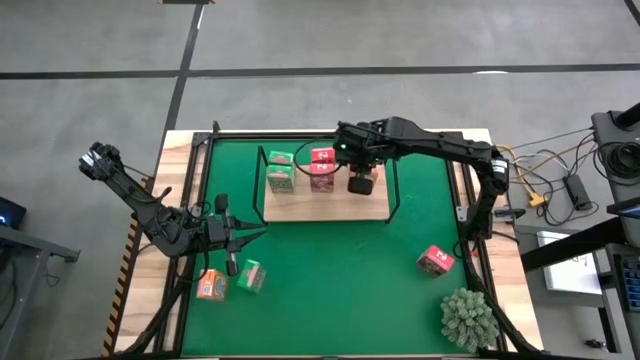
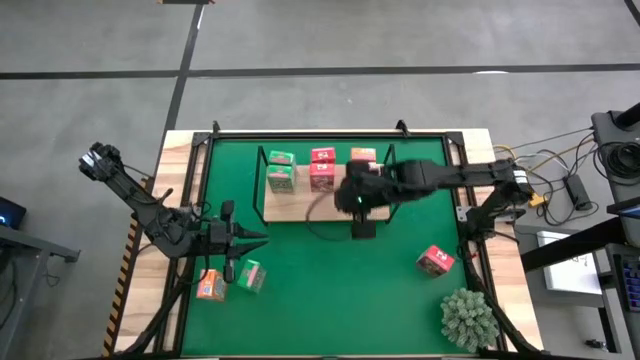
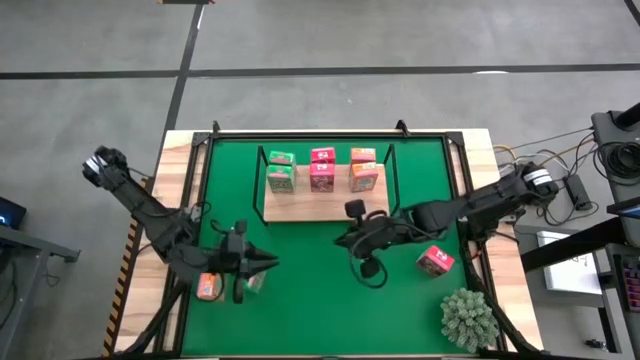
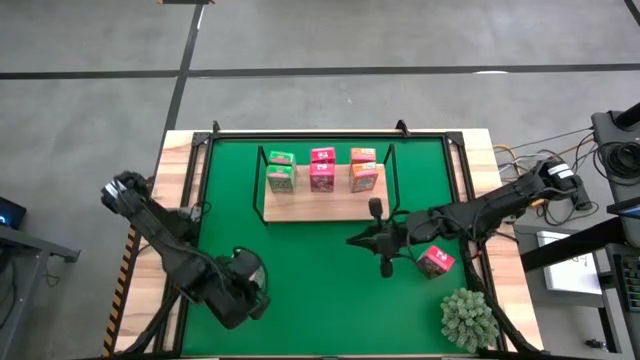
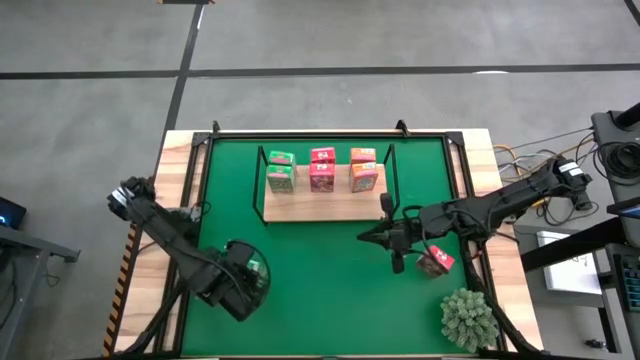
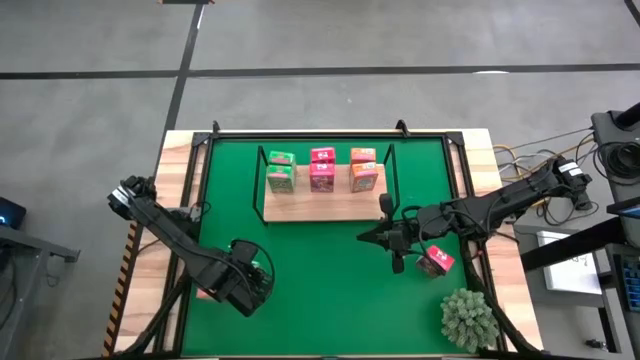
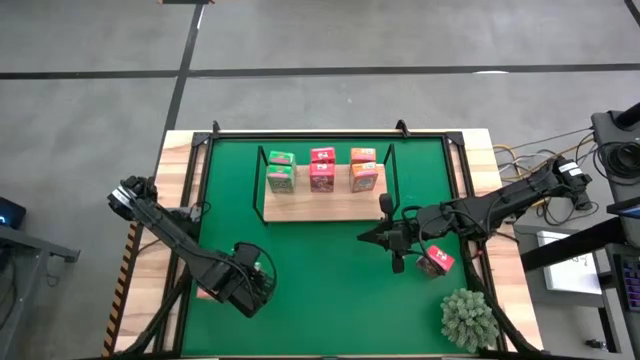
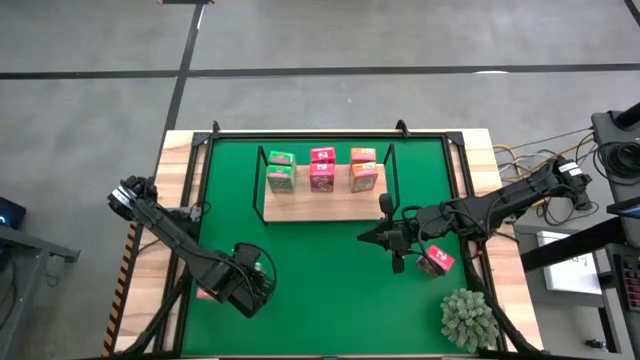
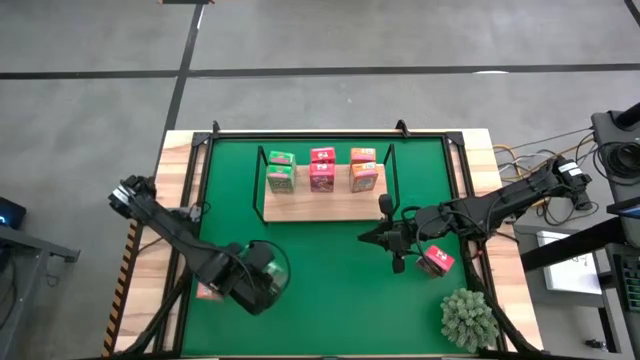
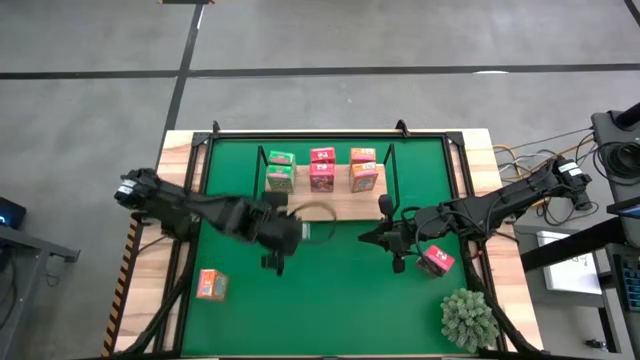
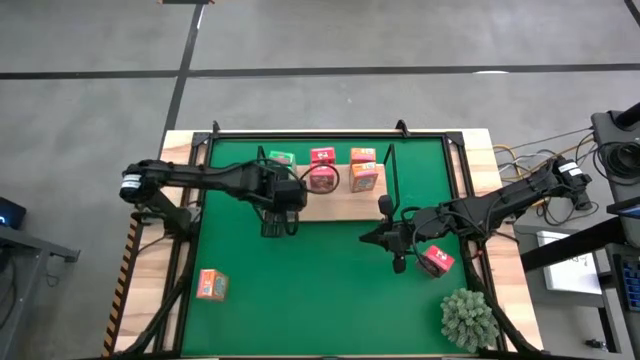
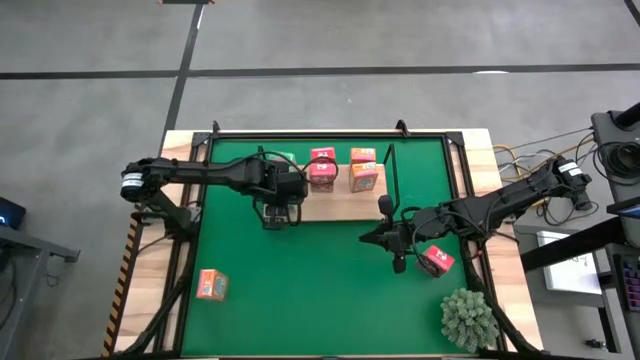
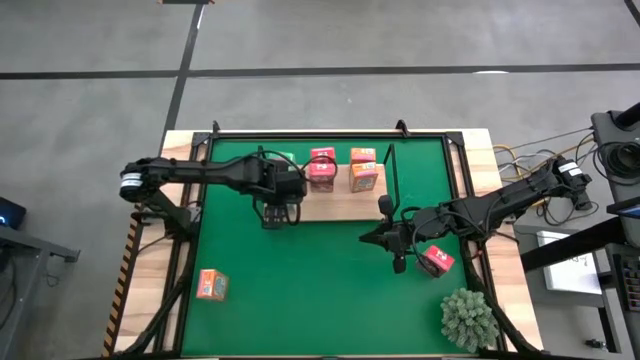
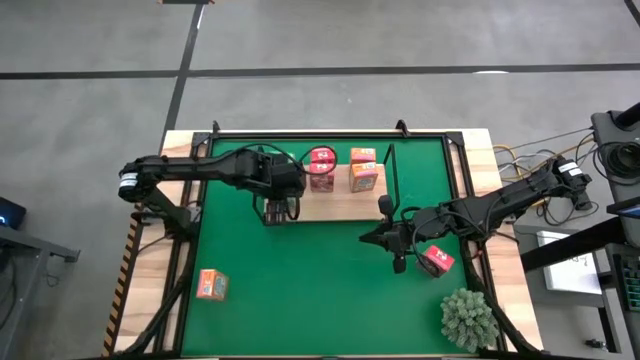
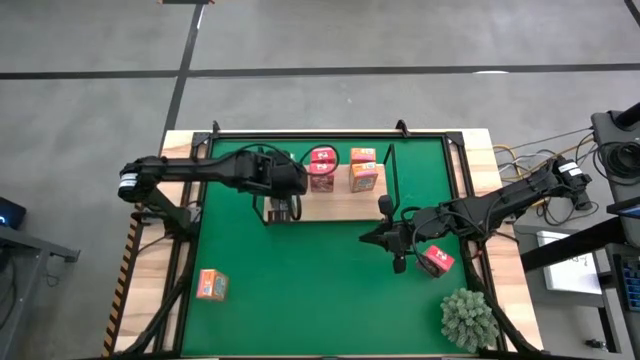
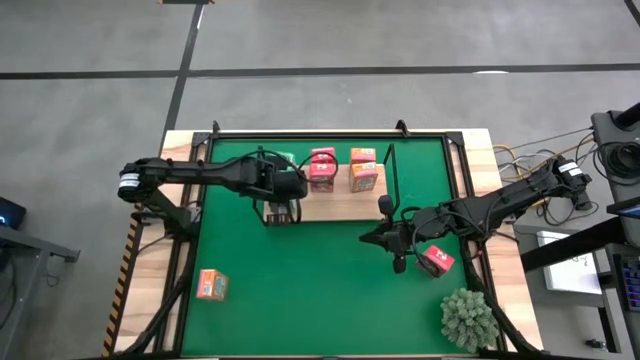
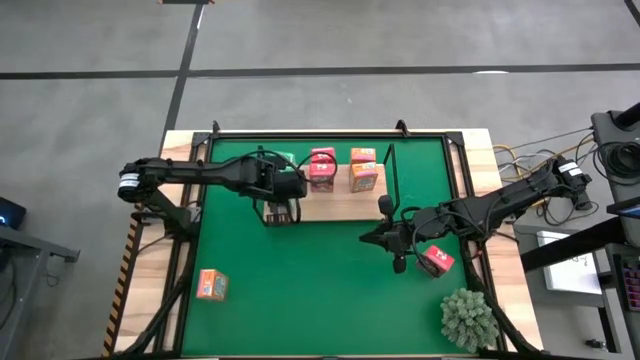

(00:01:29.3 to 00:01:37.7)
Task: Stack cereal on shelf
Put the green cereal box on the shelf aligned with the other green cereal boxes

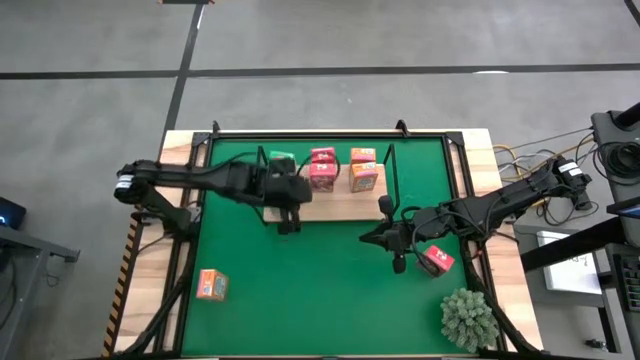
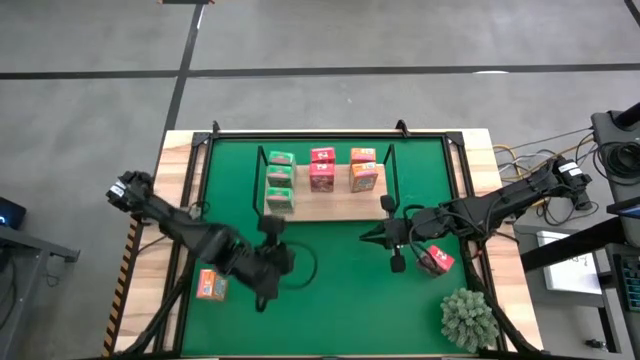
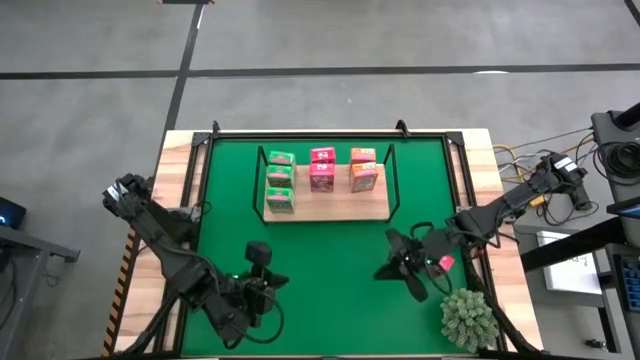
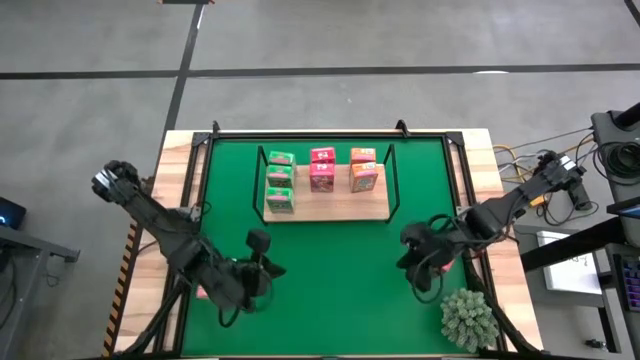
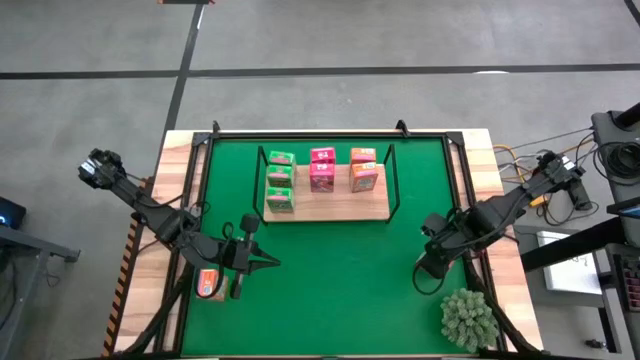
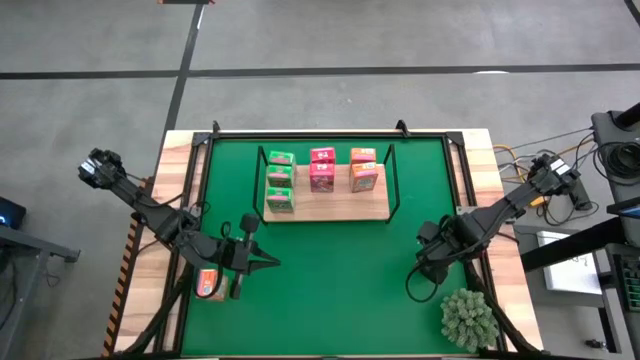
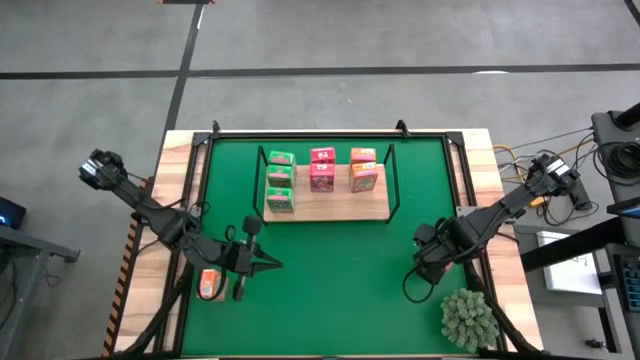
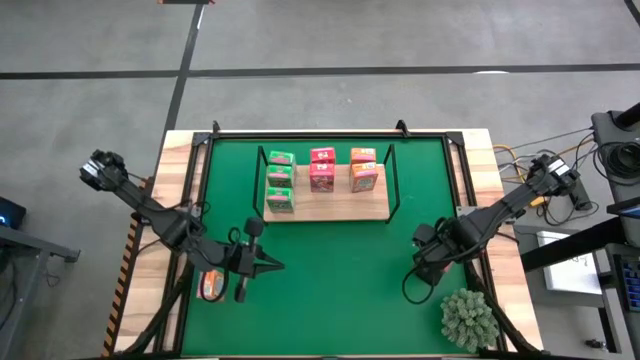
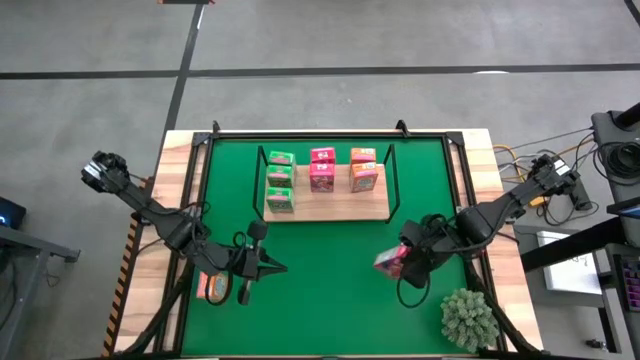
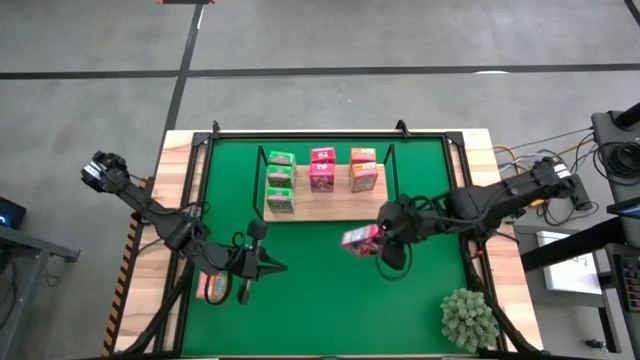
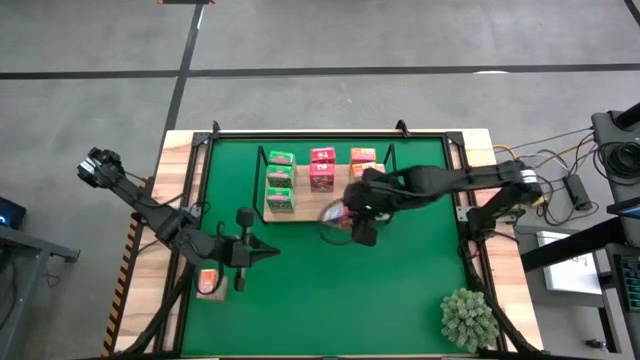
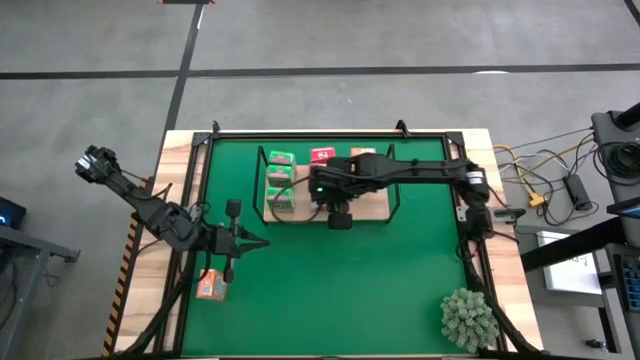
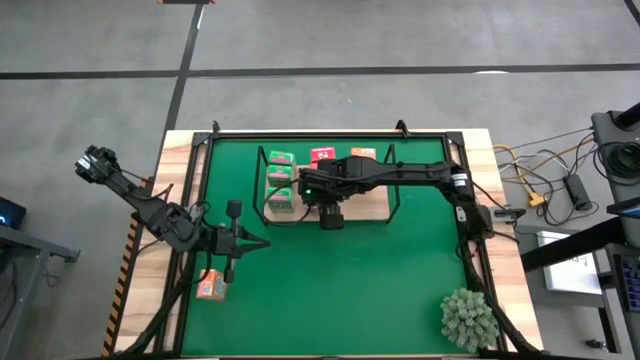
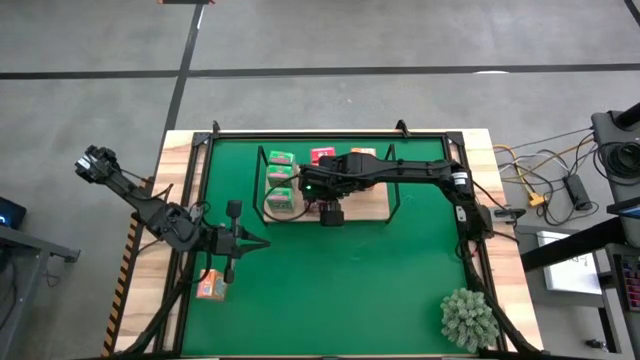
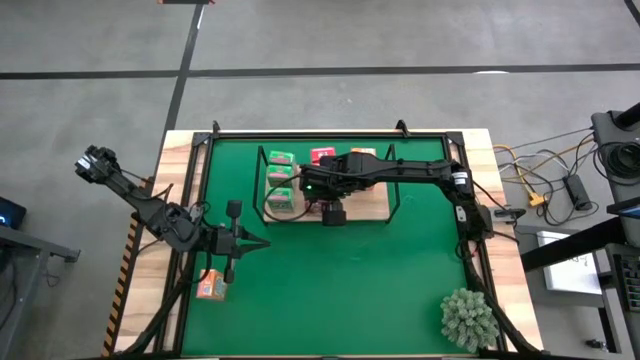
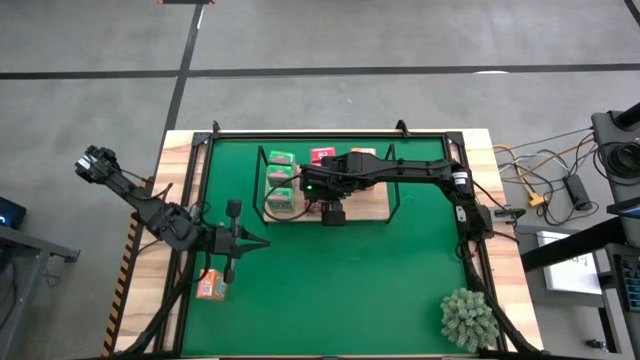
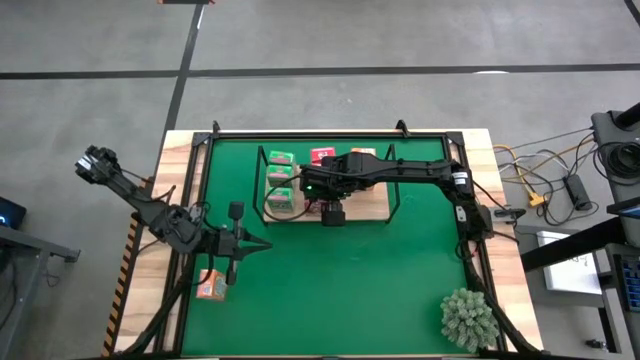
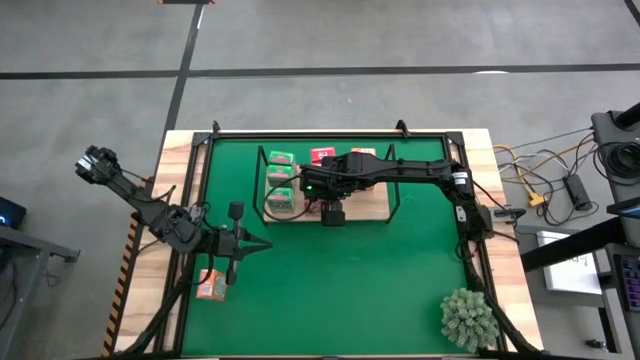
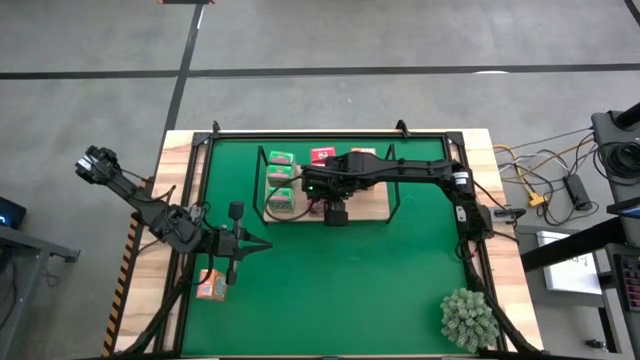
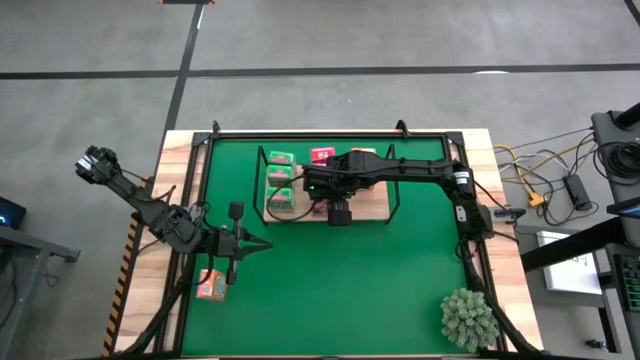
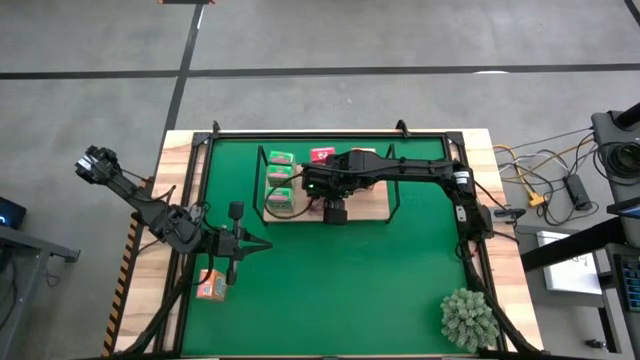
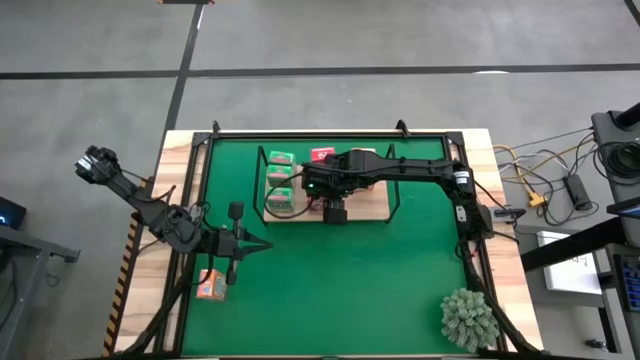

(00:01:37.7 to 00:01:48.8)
Put the red cereal box on the shelf aligned with the other red cereal boxes

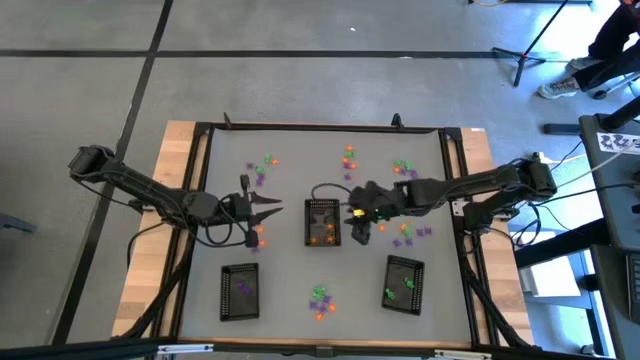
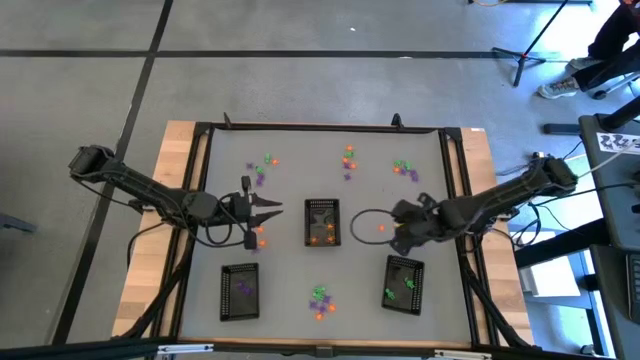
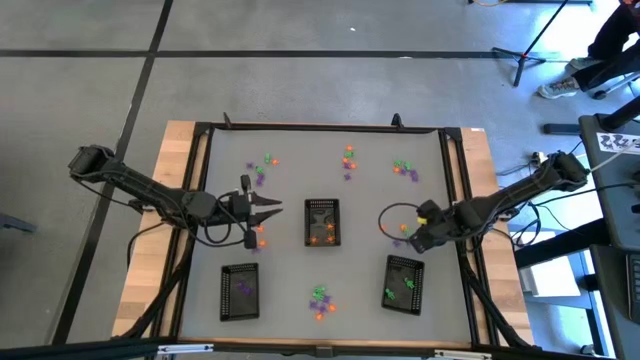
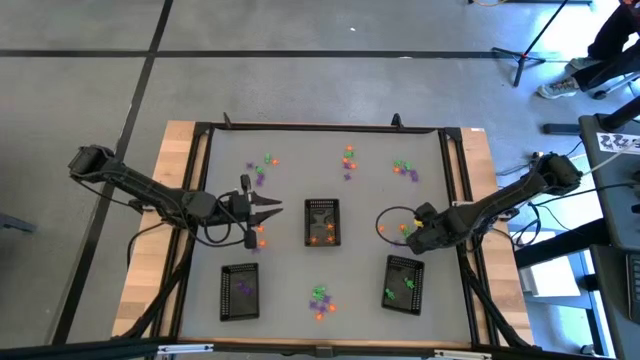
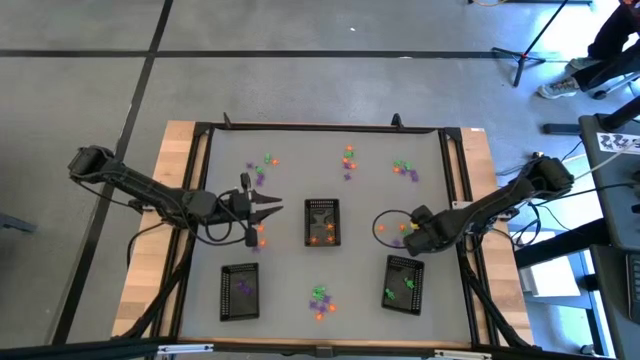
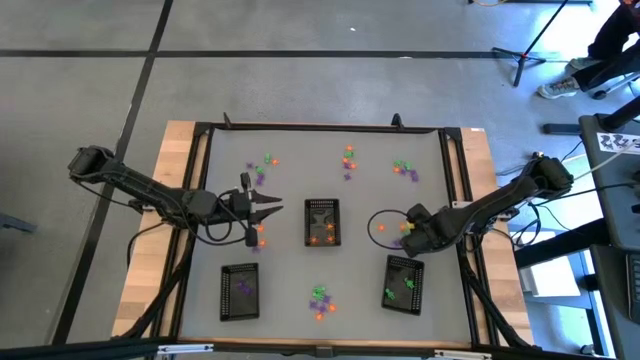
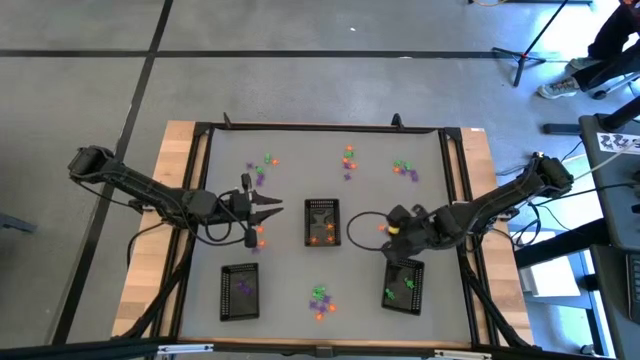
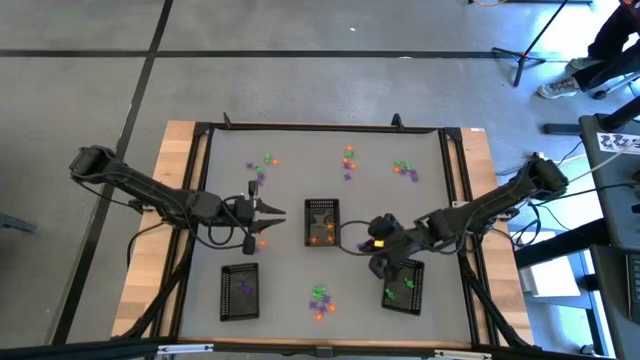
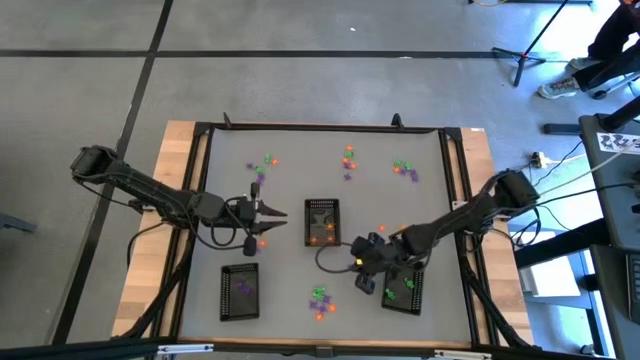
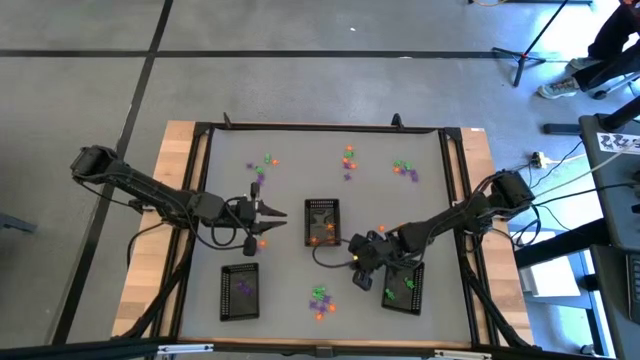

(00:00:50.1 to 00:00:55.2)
Task: Sort Halloween decoration
Put the violet spider toy into the bottom left black bin
